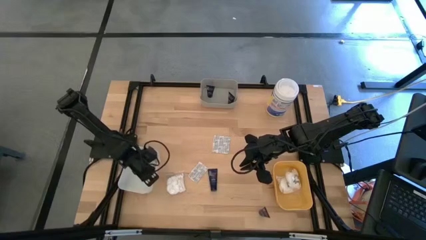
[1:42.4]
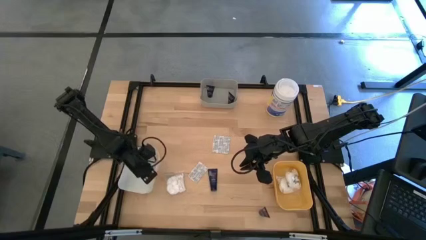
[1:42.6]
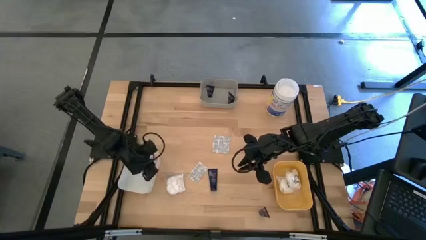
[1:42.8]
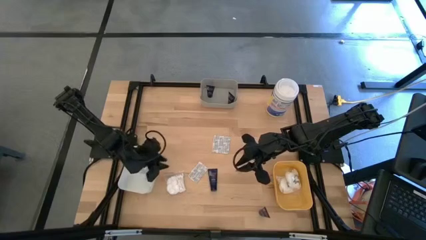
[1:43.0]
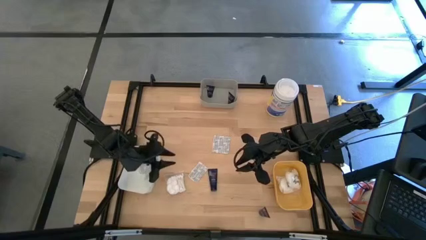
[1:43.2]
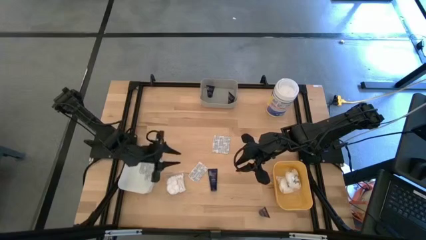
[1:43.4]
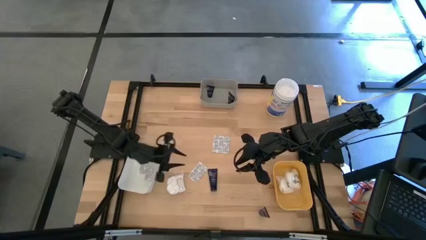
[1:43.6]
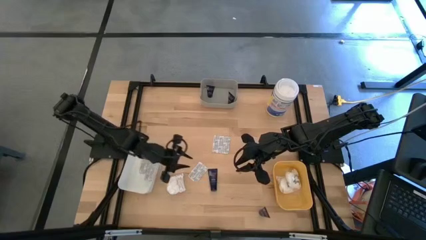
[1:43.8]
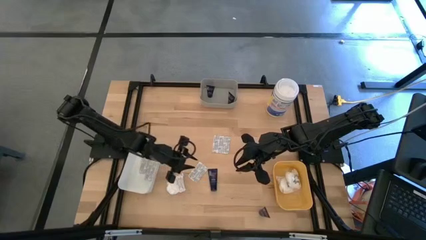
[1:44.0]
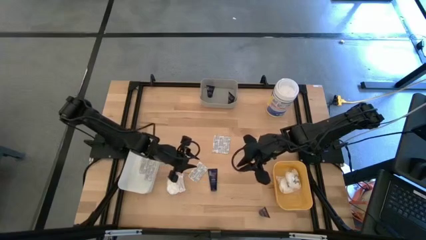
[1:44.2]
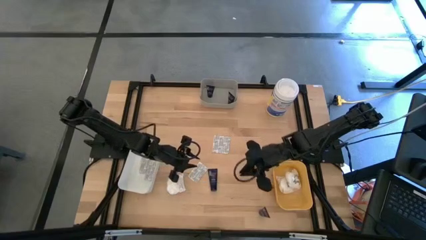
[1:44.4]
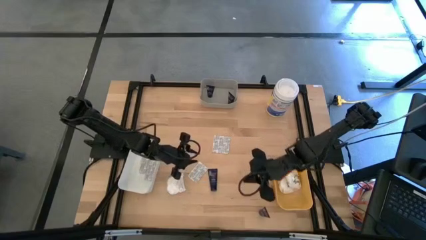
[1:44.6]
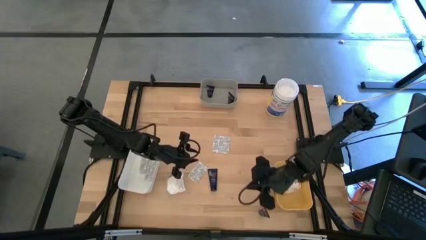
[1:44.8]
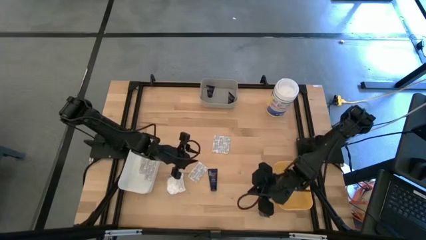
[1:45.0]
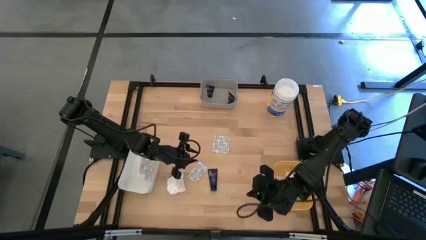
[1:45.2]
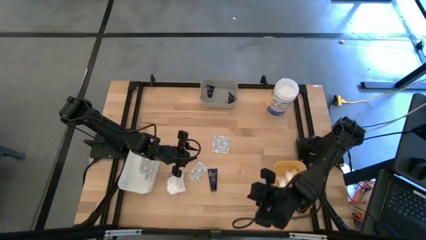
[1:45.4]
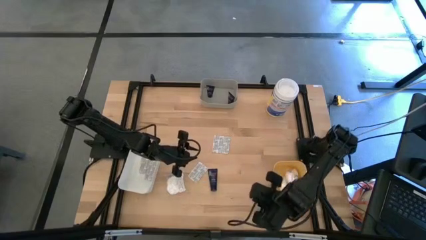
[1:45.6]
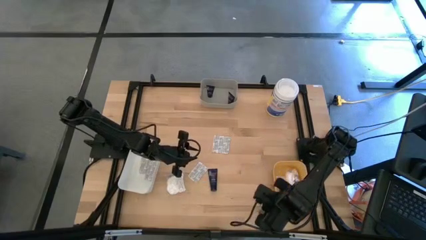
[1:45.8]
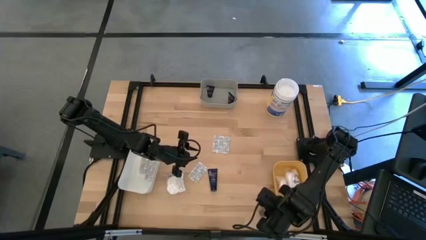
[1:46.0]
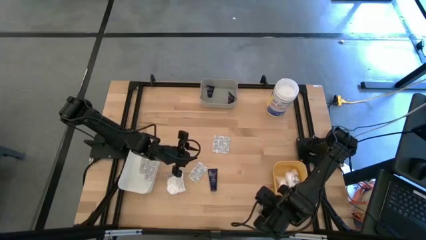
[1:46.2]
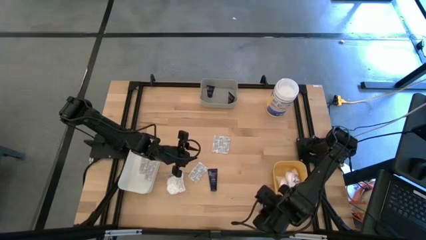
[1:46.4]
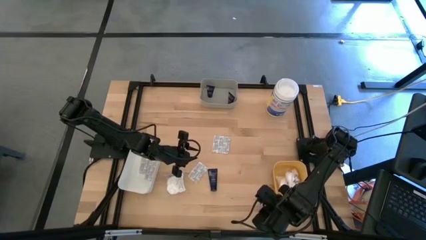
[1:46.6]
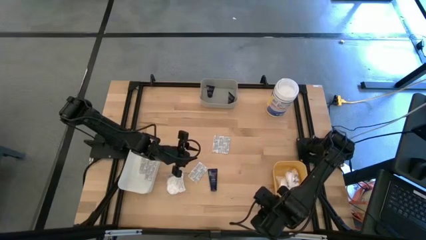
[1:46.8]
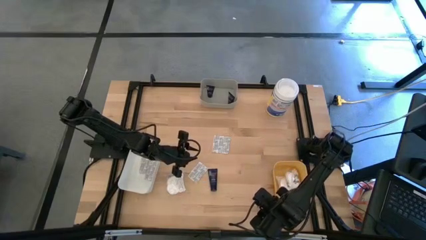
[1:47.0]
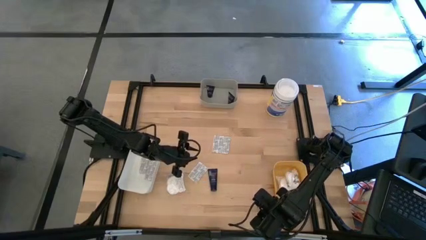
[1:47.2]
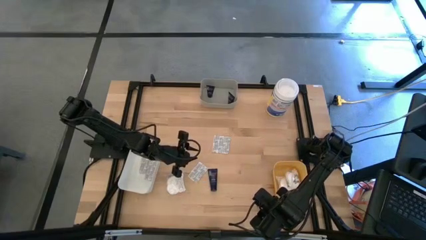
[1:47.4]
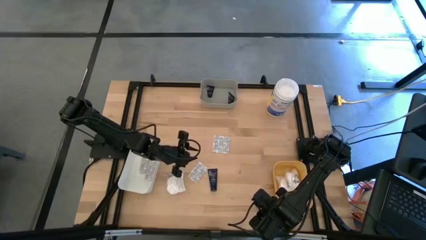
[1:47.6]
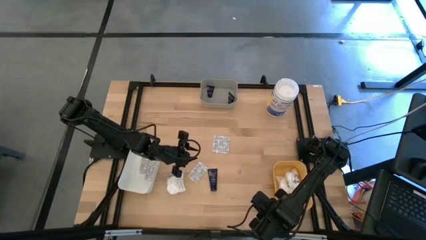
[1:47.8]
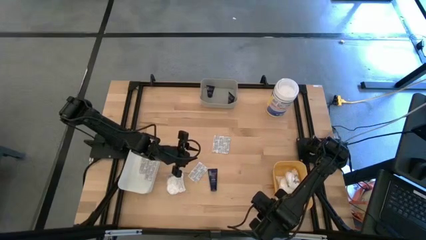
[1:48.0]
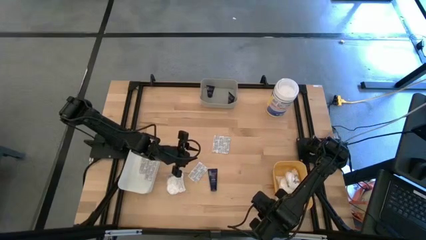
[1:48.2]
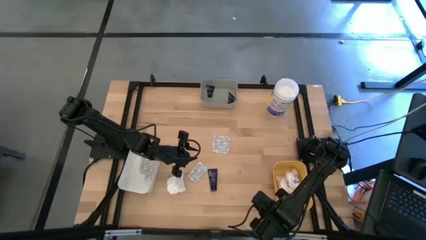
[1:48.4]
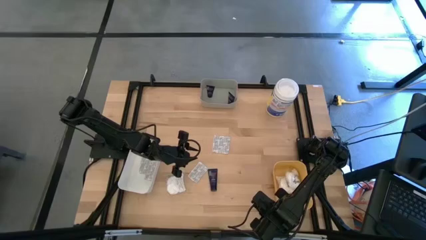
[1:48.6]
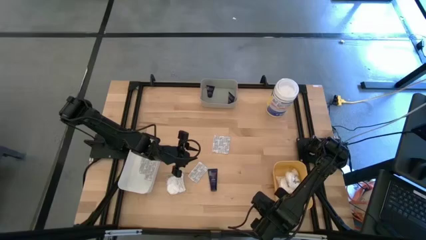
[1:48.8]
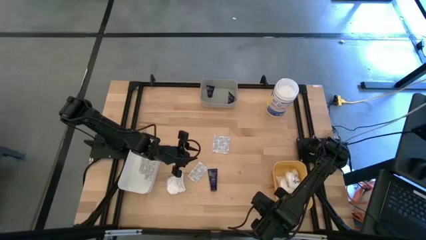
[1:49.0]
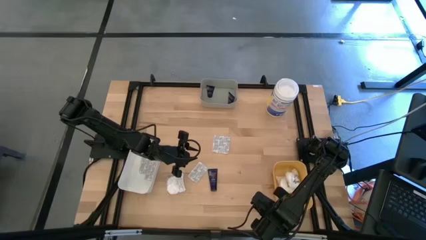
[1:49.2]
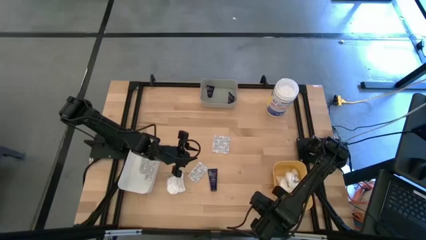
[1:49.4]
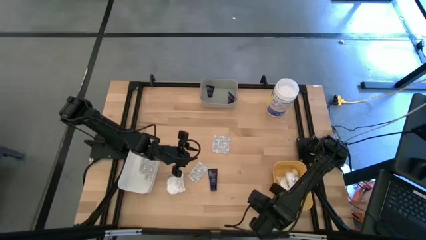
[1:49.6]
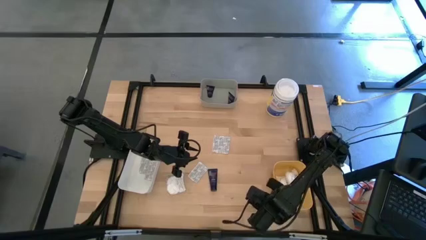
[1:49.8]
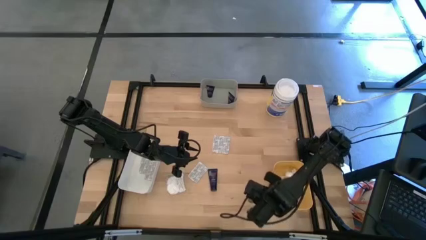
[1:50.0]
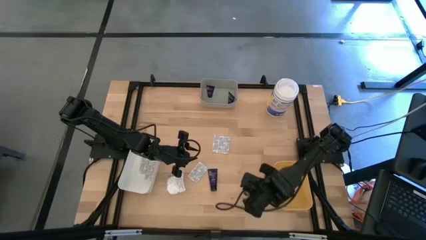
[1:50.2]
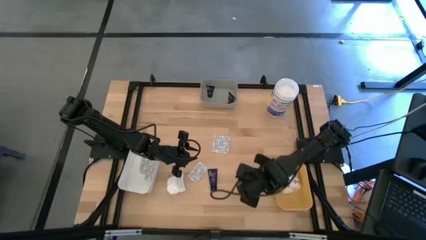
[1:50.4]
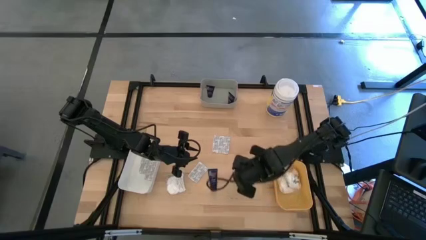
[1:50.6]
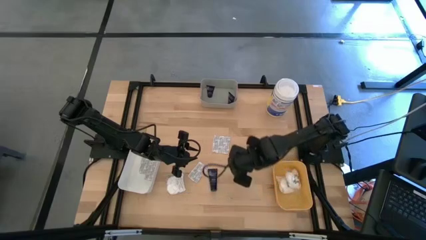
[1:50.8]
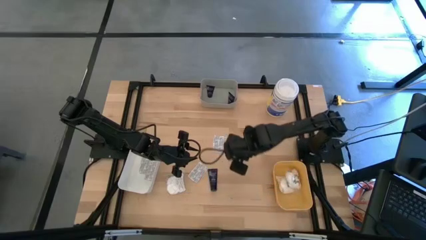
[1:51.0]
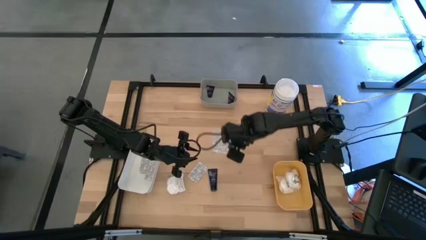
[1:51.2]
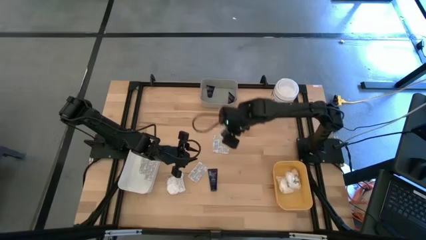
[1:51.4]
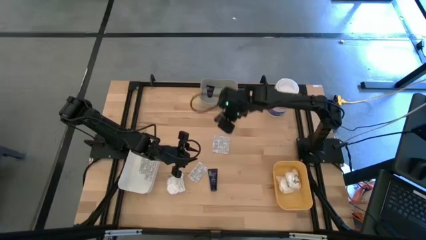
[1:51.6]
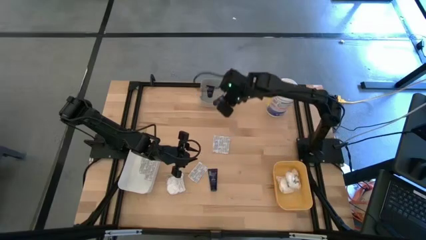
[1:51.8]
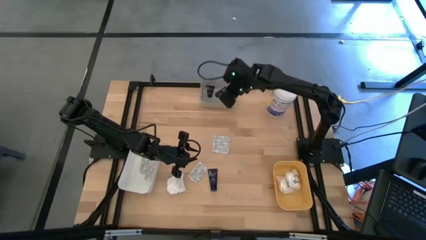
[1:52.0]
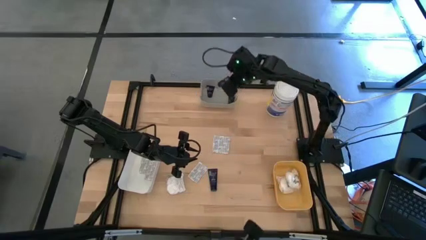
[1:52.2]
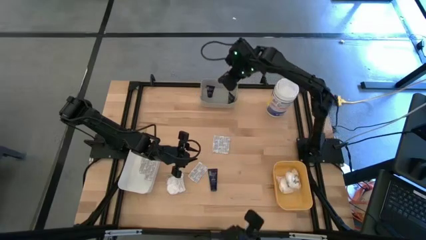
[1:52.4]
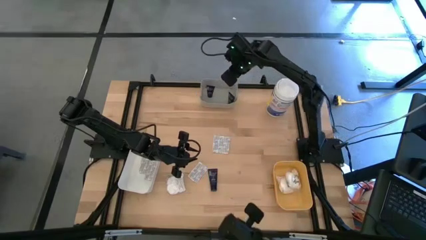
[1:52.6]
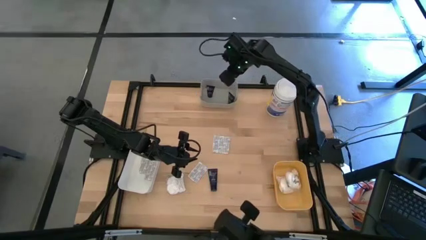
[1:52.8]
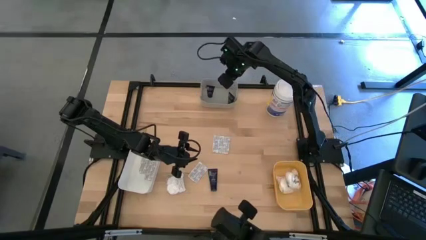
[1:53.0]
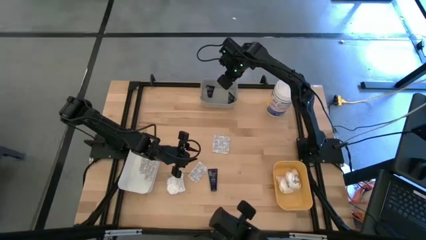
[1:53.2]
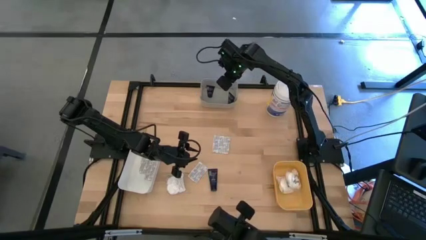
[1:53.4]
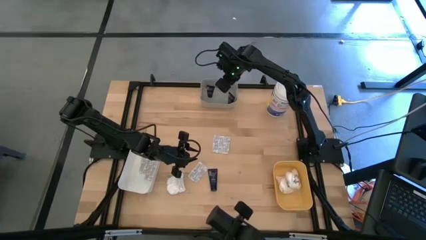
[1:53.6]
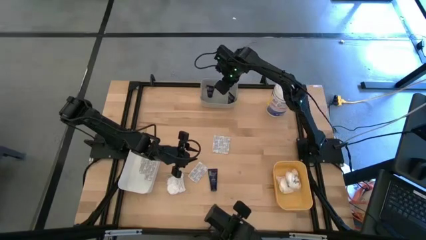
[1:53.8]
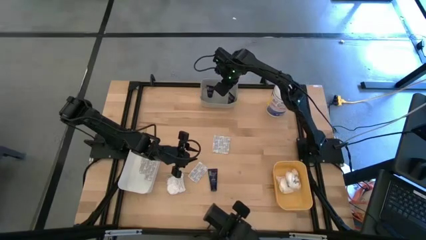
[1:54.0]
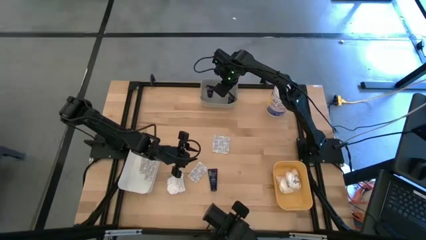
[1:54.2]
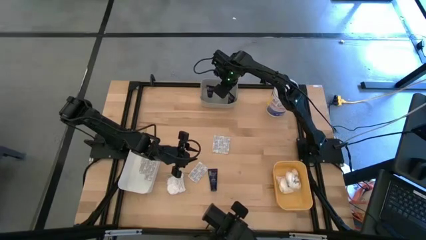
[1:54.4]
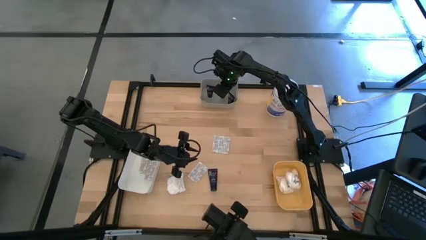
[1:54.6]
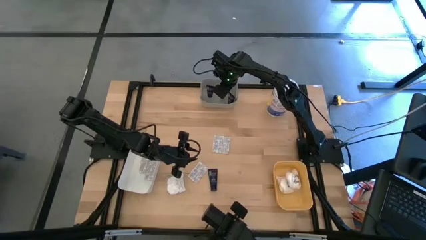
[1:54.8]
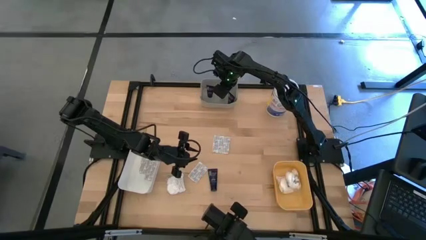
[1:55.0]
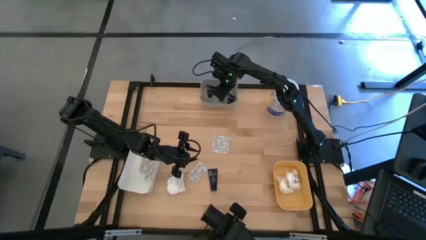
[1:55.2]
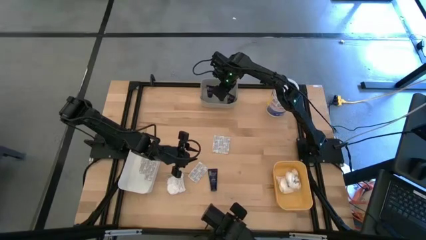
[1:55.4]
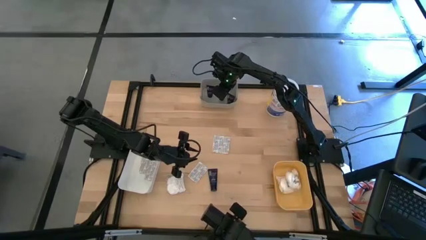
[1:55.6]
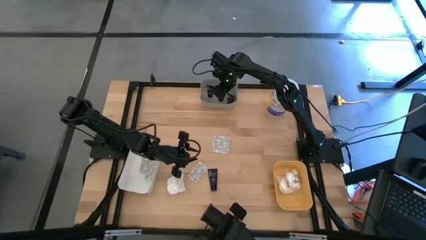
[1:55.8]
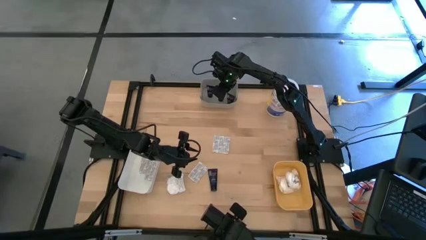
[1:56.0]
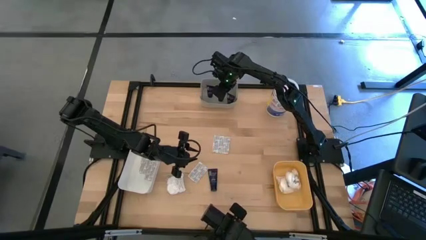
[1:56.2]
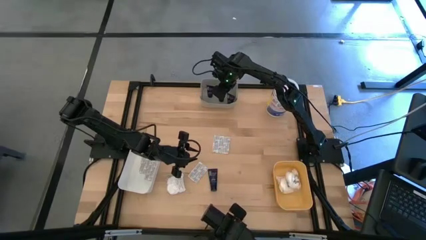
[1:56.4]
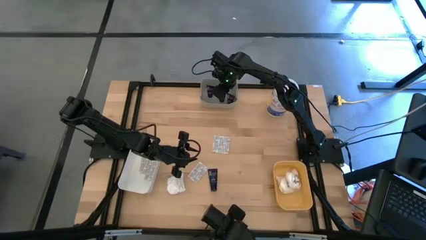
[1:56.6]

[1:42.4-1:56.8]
Task: Pick & Place Travel size toiletries
Put the shave cream into the gray bin

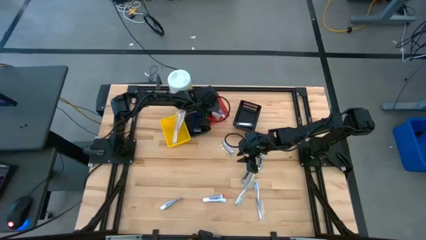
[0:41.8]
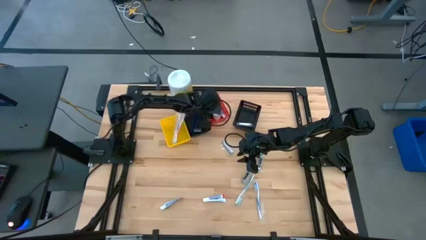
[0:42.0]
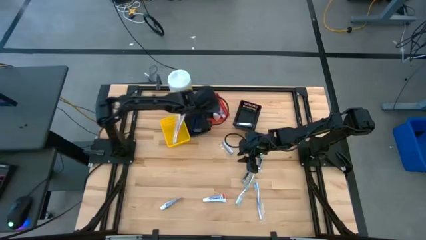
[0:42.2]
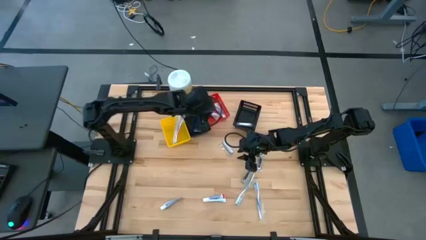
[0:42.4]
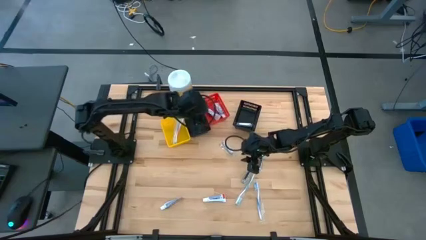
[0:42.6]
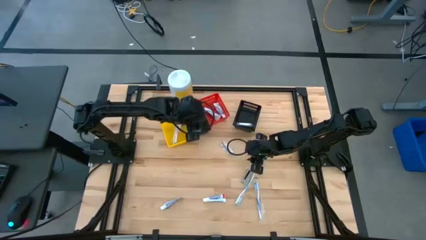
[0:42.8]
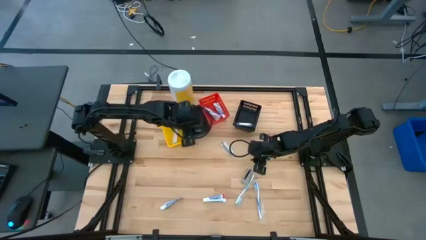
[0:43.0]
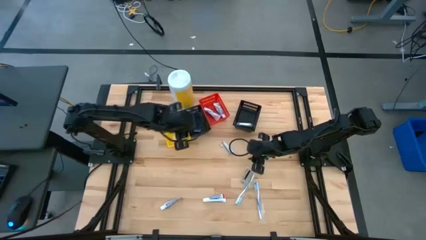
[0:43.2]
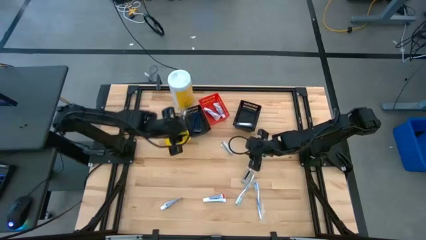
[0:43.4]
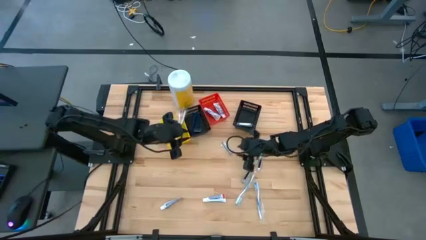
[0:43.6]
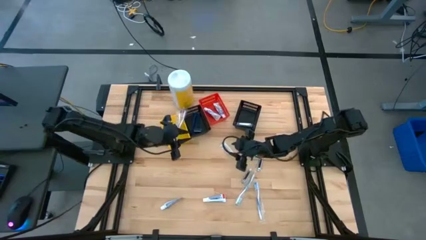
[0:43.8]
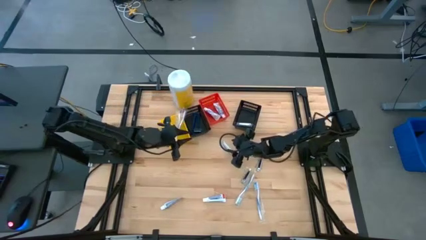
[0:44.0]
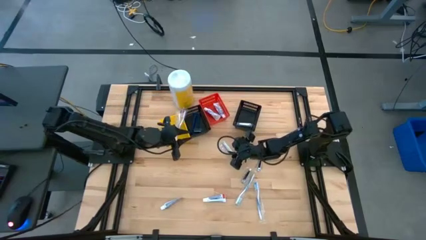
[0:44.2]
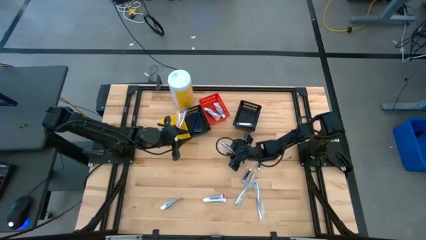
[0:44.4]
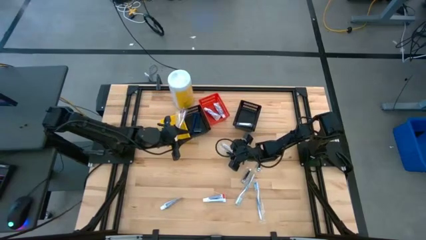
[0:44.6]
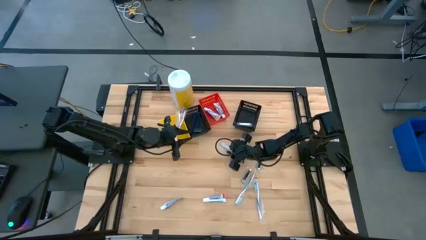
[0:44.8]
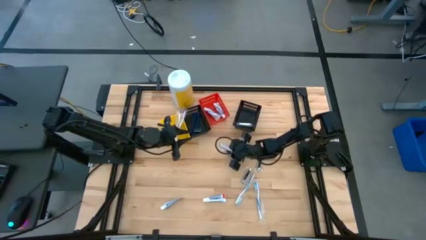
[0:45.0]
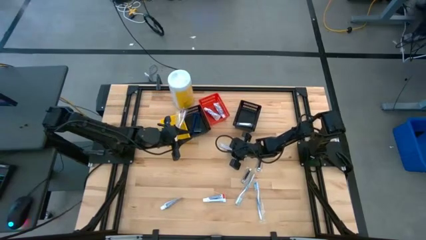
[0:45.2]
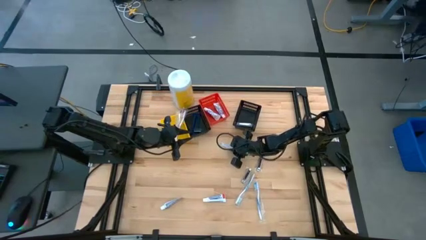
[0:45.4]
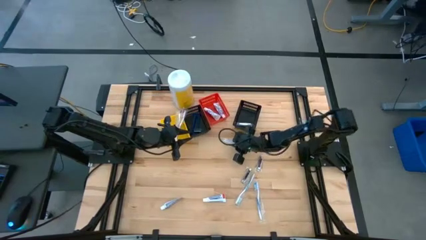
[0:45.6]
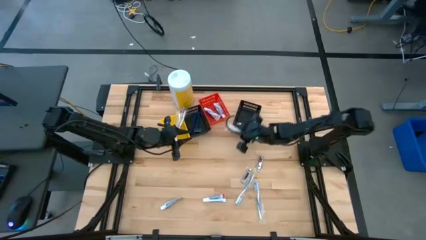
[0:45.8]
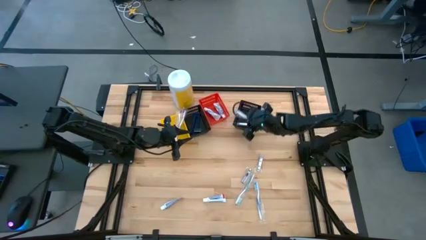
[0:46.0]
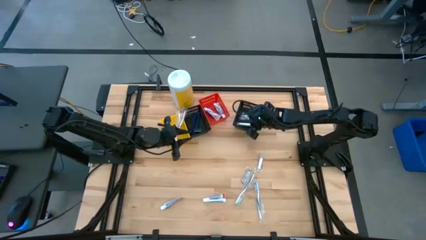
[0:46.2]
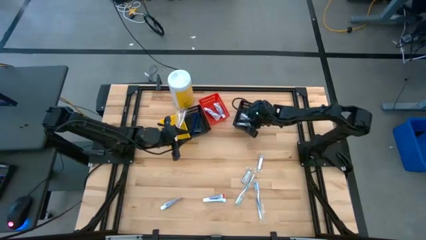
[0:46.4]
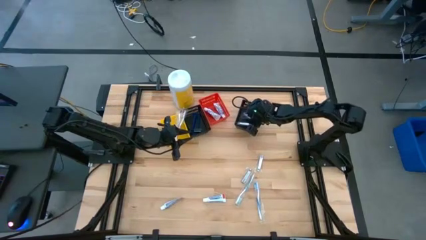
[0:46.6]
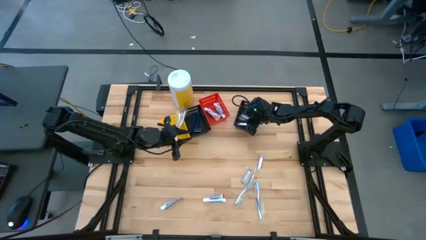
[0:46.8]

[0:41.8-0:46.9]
Task: Pick & Place Travel size toiletries
Put the silver nail cutter into the right black bin
